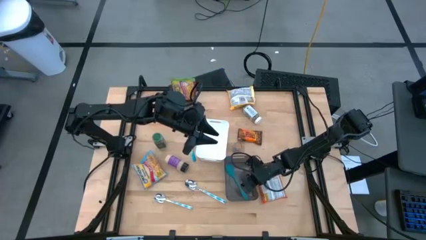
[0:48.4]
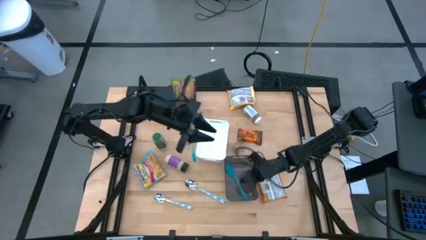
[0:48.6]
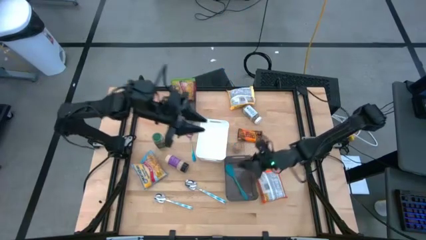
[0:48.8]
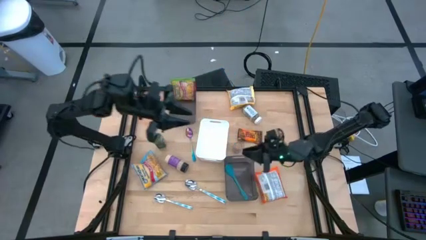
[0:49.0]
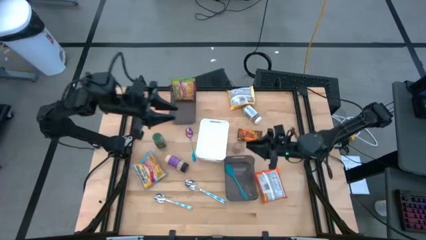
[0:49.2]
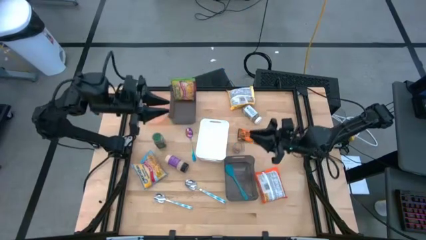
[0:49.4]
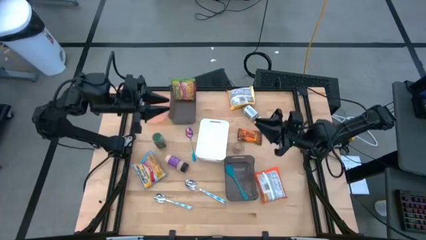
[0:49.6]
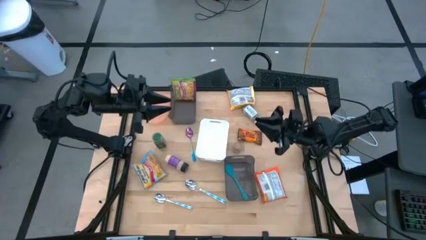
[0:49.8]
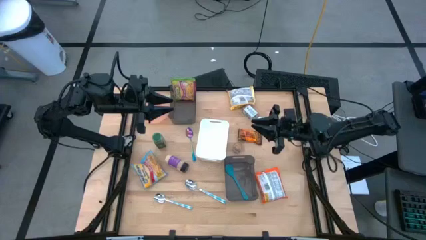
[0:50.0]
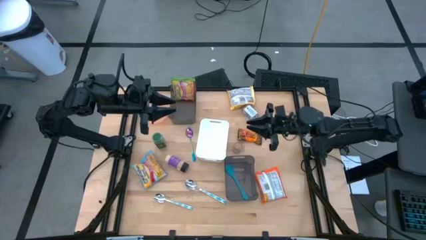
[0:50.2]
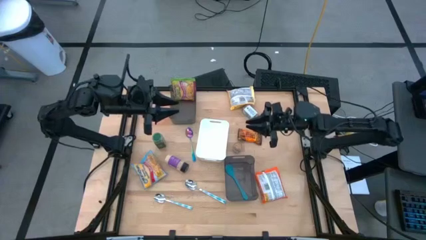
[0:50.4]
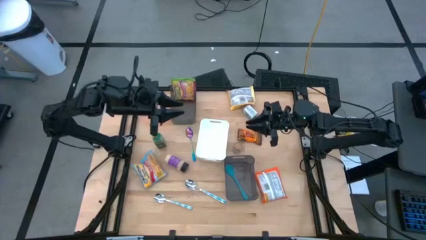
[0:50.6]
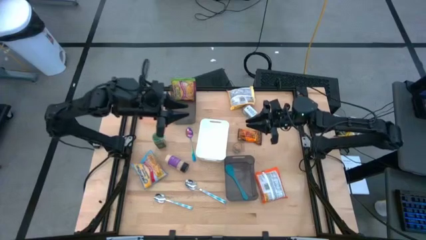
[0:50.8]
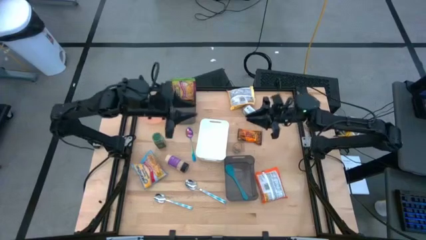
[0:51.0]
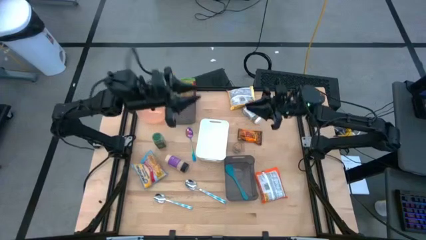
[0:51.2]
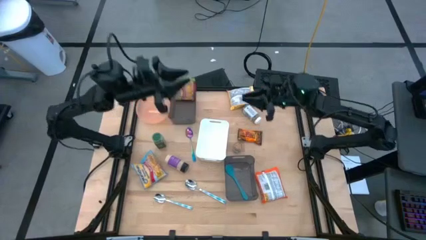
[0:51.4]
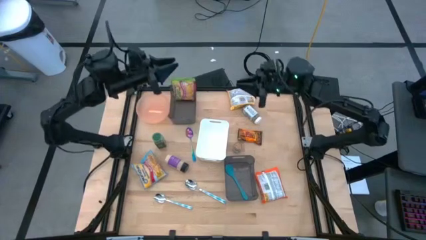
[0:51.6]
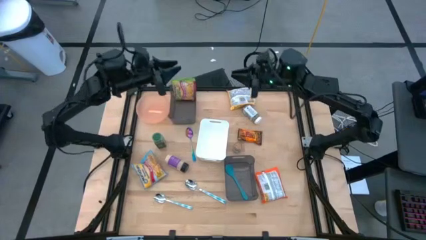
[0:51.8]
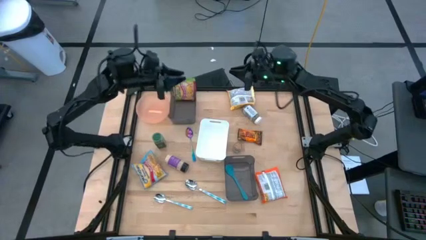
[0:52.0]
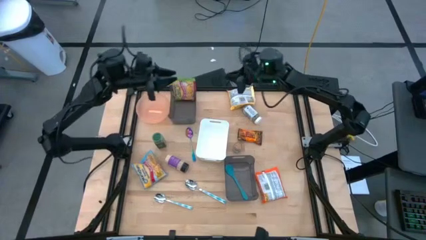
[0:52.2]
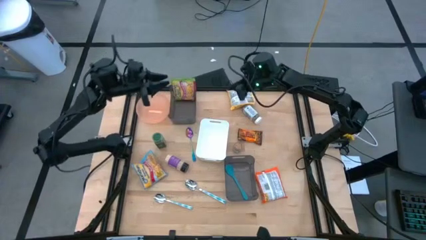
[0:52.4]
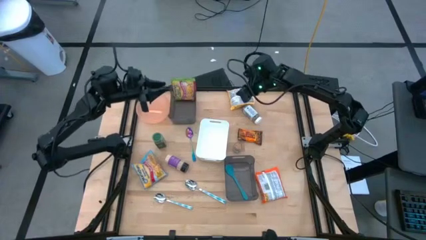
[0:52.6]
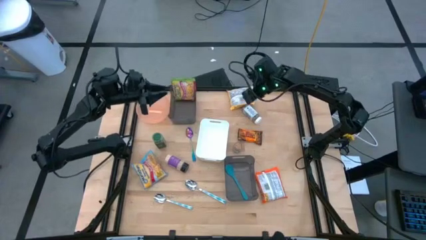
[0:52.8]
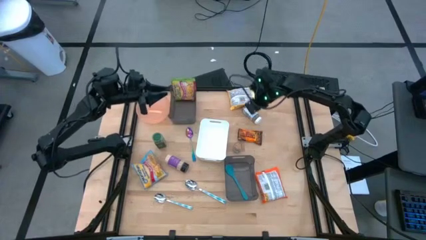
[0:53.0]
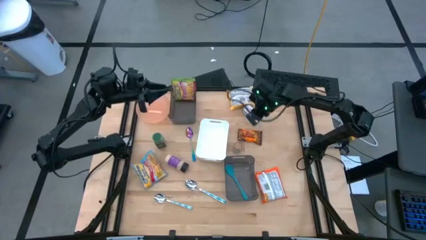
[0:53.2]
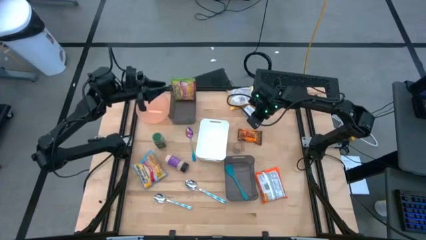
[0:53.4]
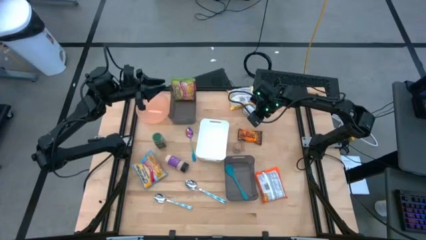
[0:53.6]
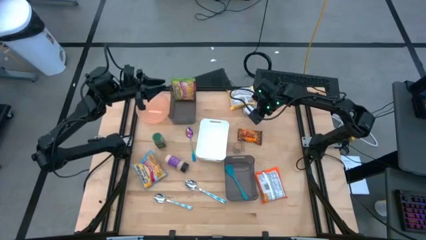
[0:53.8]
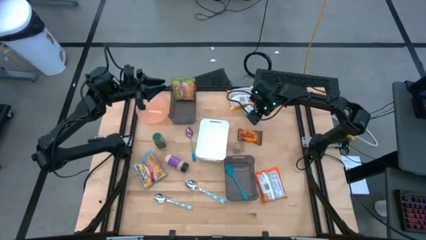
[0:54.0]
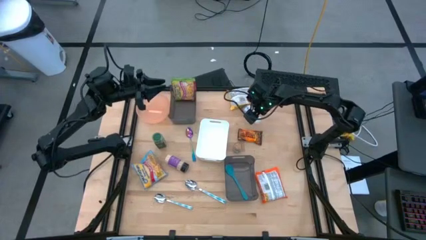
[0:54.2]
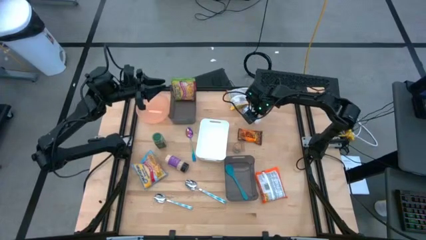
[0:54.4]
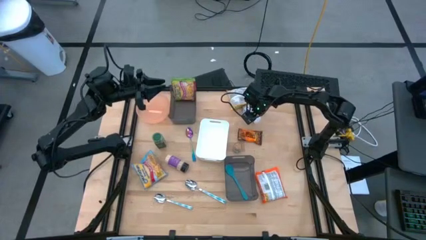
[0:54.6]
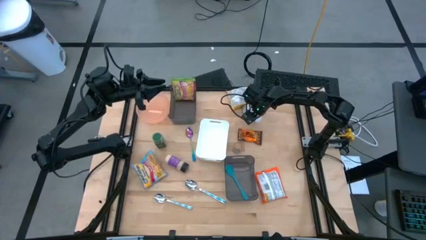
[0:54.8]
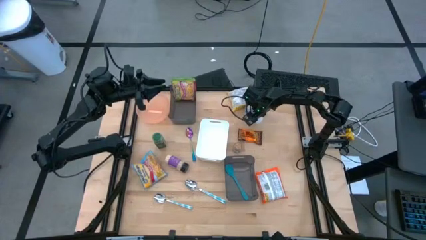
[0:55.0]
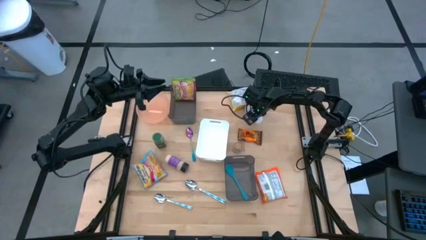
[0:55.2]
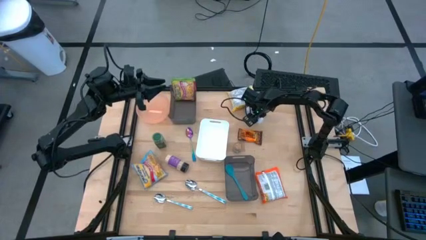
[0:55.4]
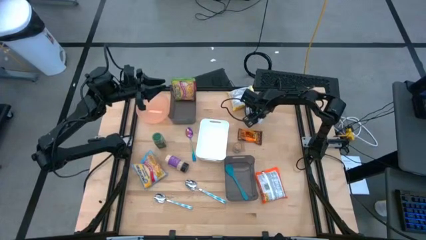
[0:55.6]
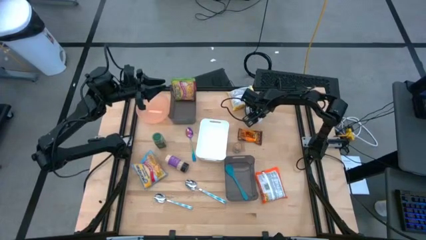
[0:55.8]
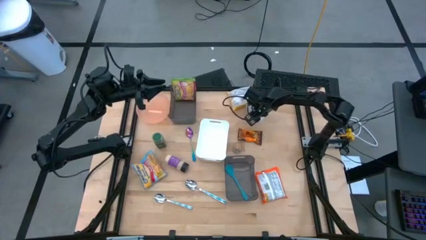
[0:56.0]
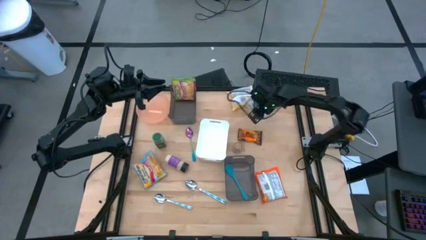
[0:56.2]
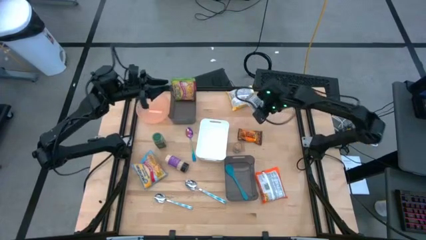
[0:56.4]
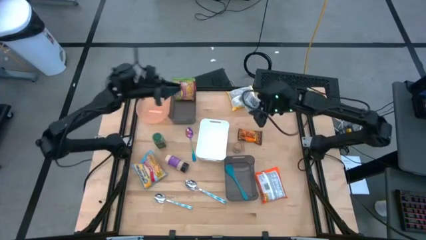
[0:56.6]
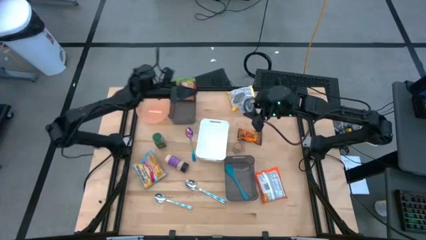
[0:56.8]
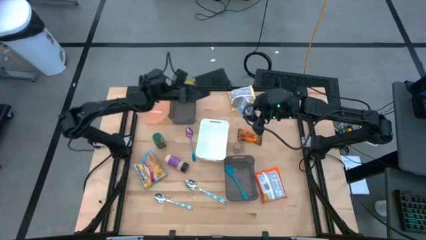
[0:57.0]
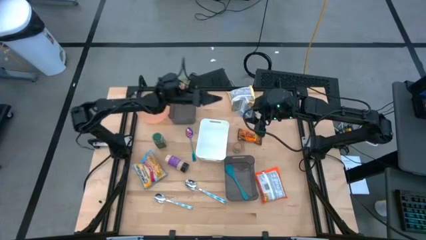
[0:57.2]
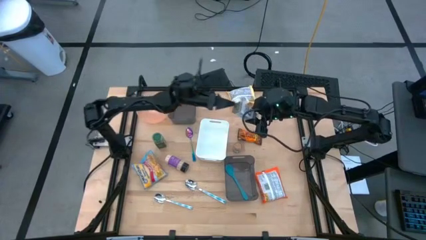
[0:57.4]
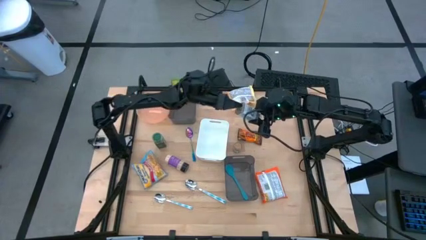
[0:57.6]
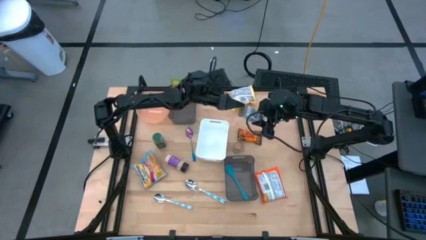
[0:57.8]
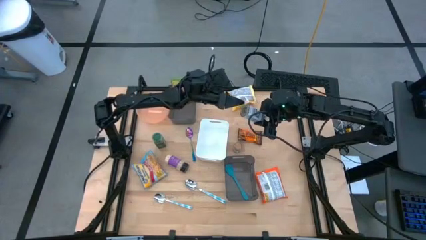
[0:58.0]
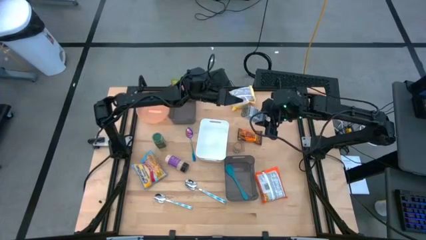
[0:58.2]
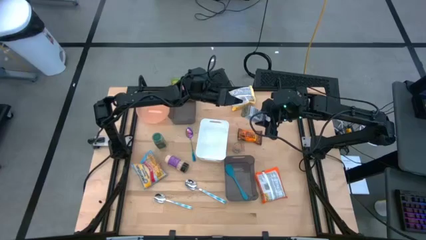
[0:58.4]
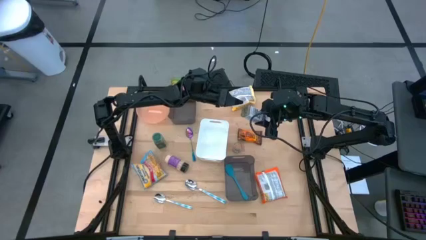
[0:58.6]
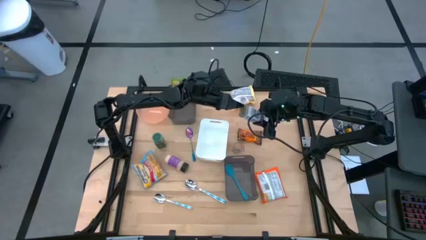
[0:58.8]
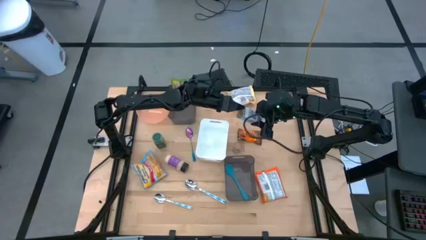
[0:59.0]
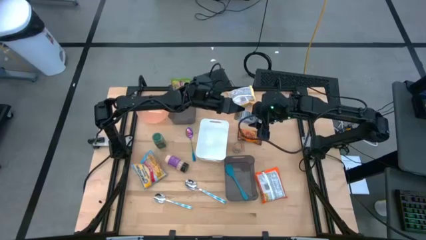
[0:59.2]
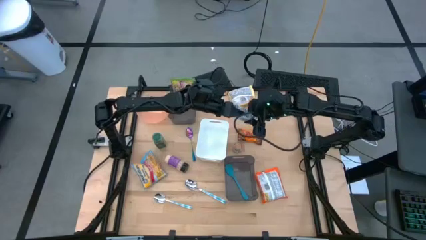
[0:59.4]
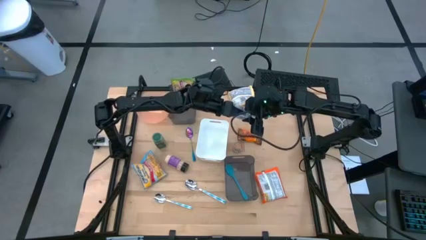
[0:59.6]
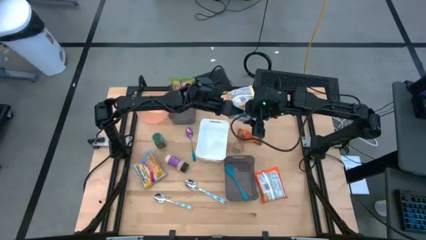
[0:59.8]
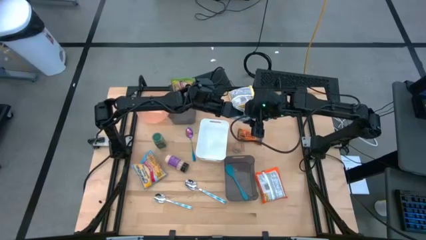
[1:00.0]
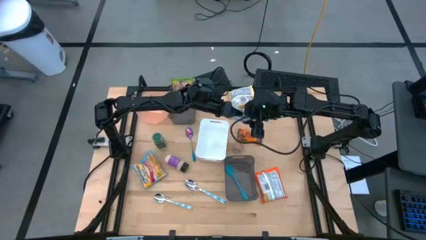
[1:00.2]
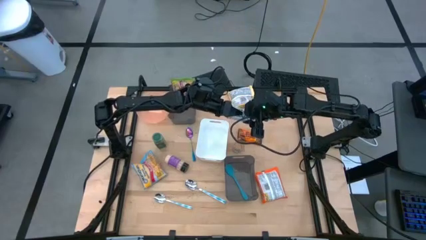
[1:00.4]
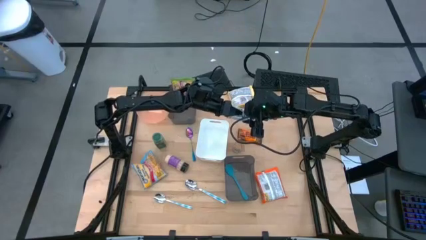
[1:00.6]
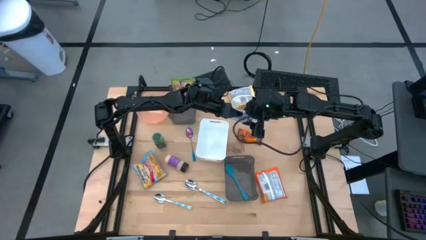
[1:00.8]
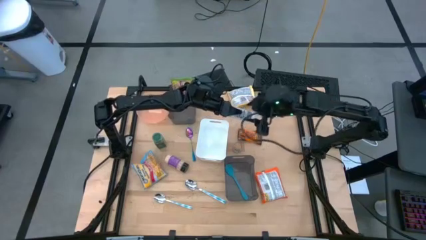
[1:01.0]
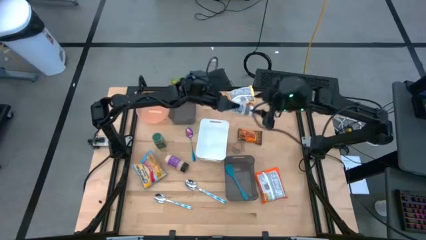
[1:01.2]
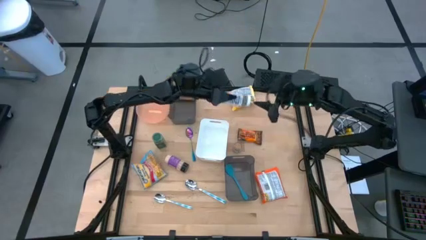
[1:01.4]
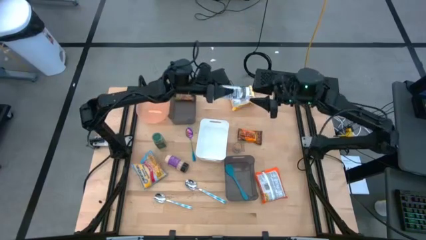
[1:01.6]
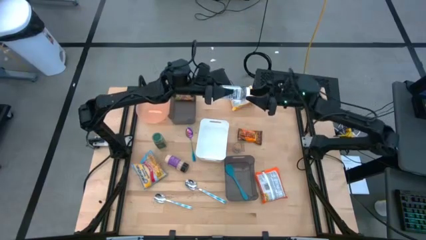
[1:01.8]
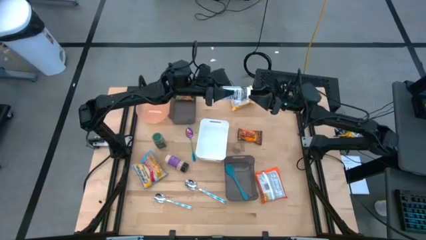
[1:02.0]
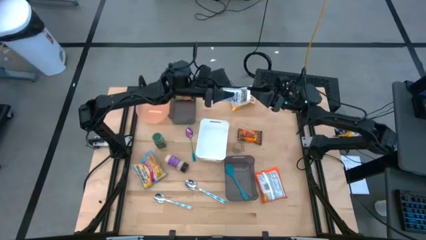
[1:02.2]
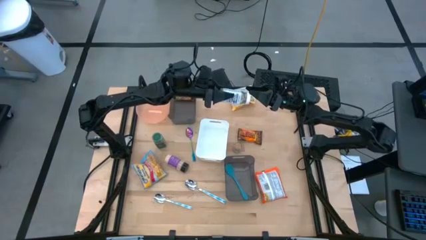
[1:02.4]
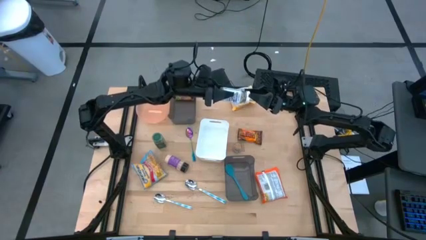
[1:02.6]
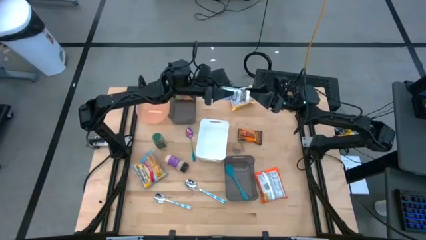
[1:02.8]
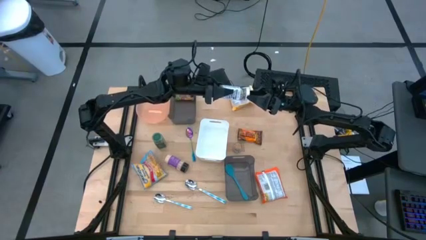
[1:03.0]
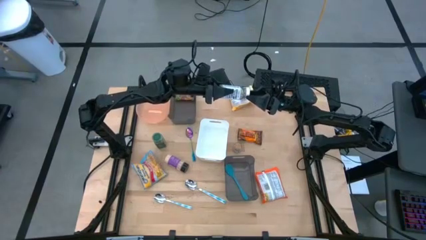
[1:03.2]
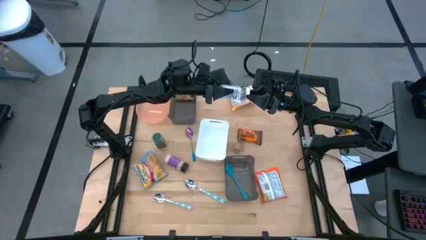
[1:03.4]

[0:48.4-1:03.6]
Task: Pick & Place Food Item
Put the white seasoning bottle into the white bin
